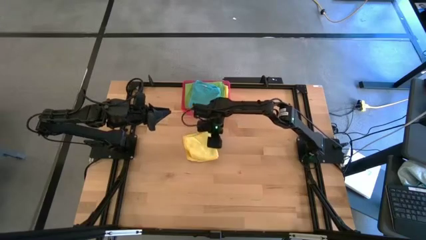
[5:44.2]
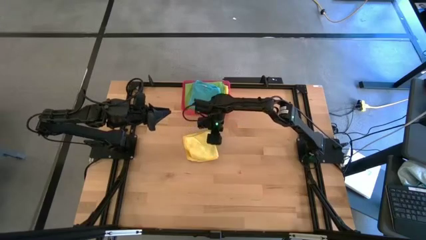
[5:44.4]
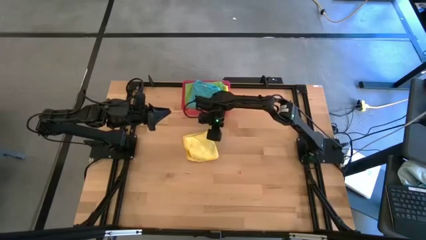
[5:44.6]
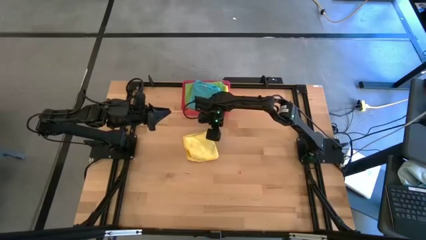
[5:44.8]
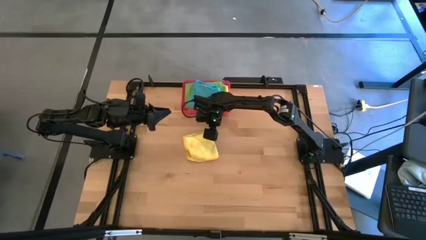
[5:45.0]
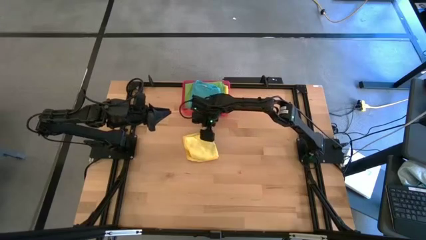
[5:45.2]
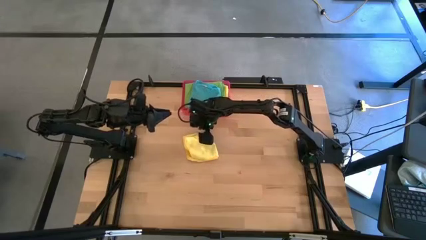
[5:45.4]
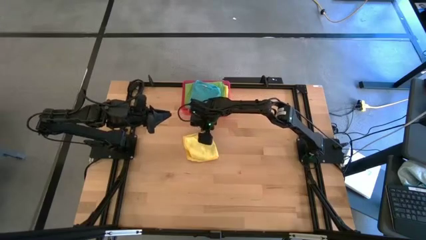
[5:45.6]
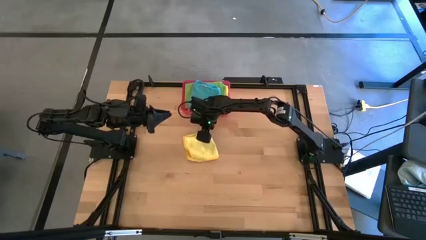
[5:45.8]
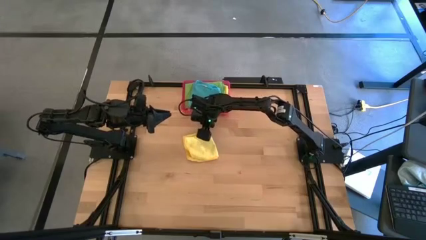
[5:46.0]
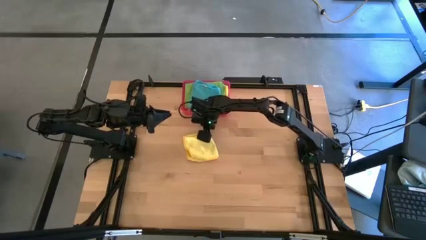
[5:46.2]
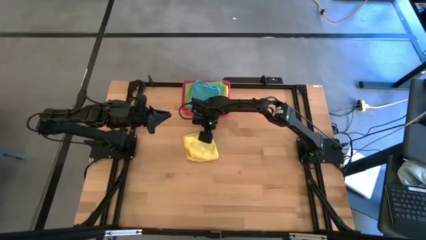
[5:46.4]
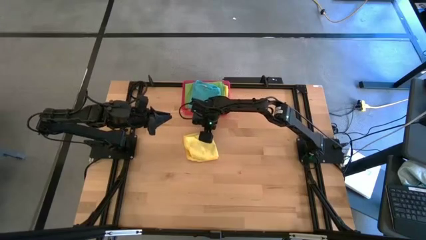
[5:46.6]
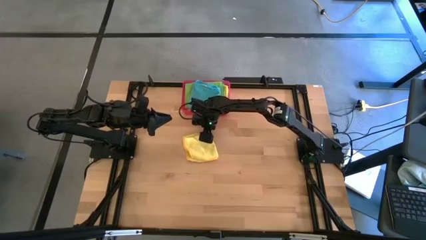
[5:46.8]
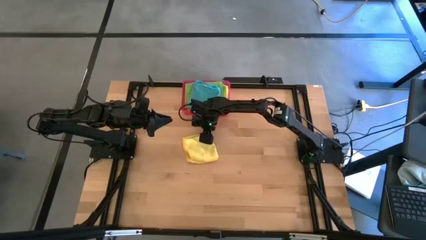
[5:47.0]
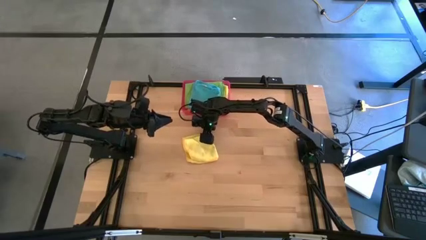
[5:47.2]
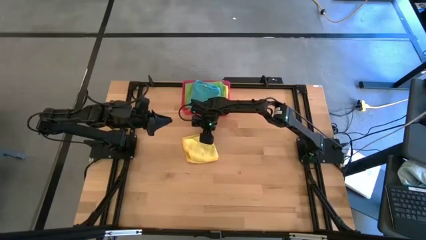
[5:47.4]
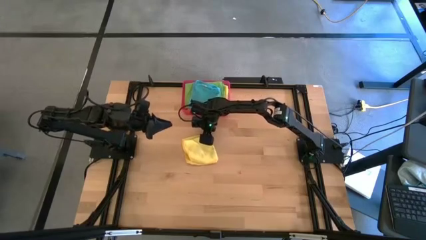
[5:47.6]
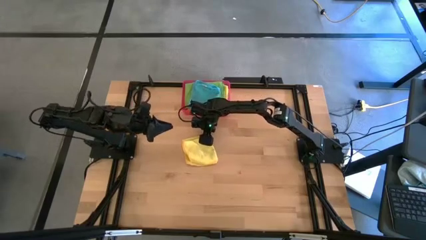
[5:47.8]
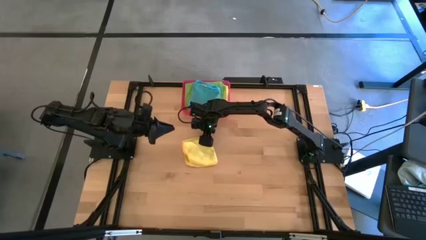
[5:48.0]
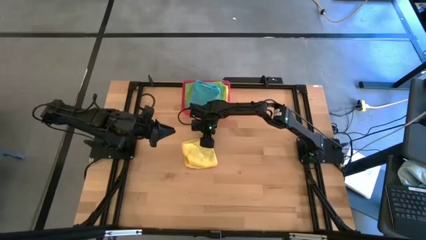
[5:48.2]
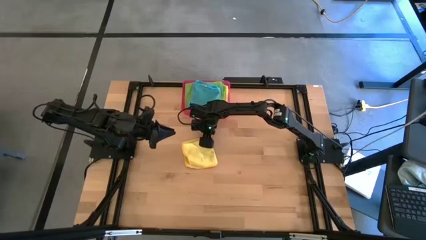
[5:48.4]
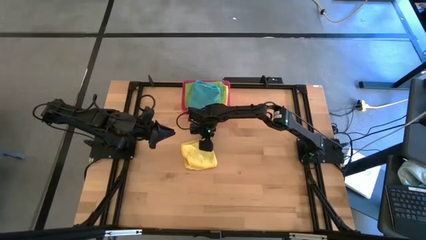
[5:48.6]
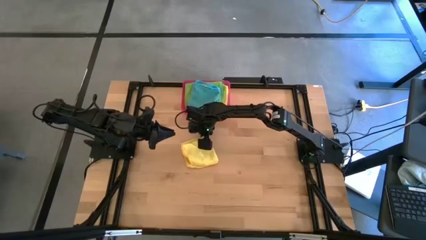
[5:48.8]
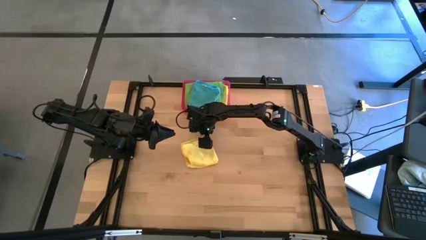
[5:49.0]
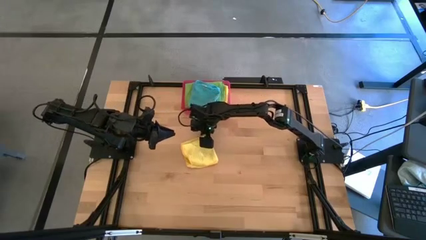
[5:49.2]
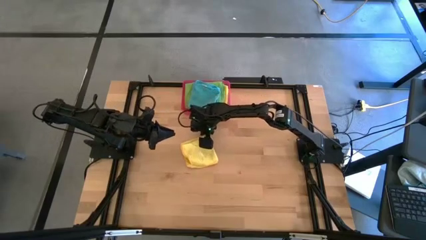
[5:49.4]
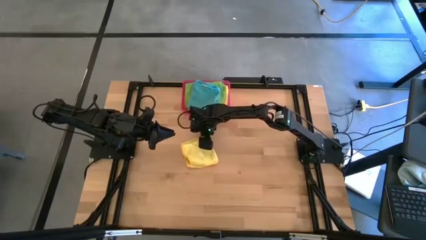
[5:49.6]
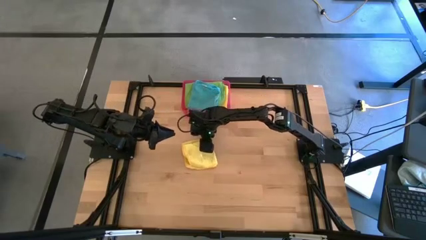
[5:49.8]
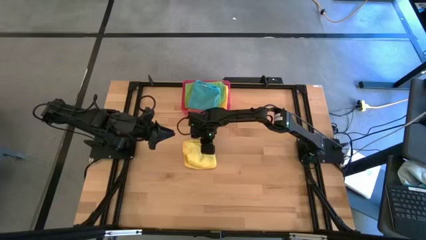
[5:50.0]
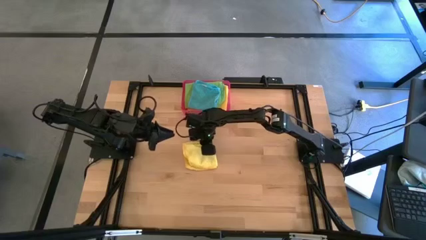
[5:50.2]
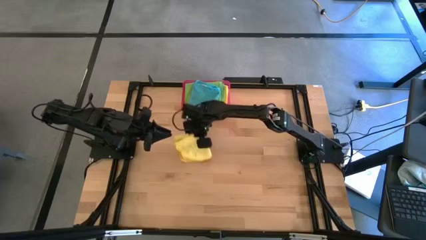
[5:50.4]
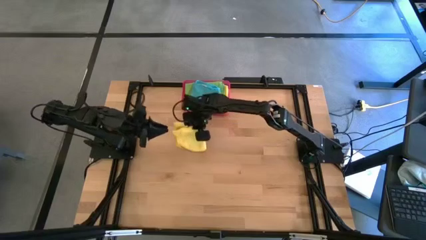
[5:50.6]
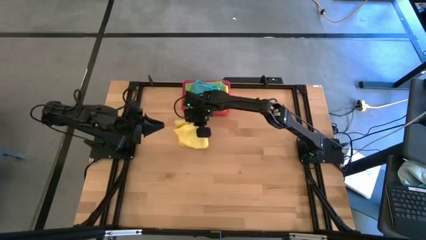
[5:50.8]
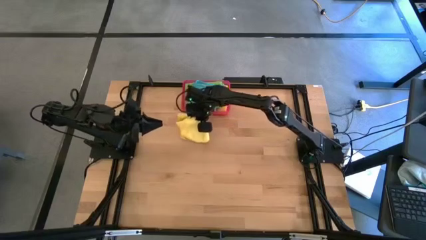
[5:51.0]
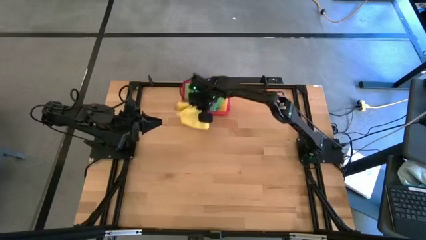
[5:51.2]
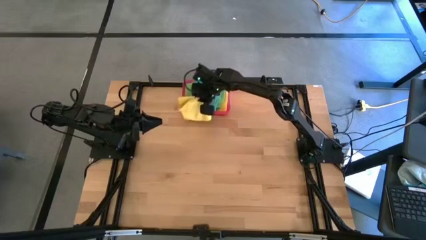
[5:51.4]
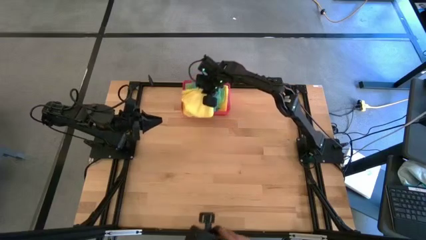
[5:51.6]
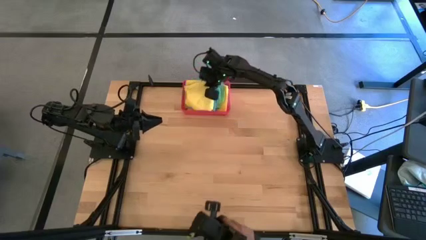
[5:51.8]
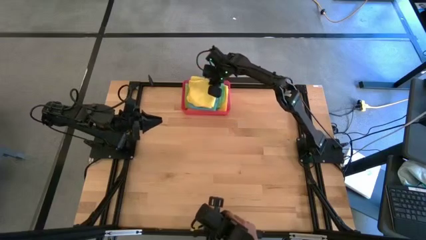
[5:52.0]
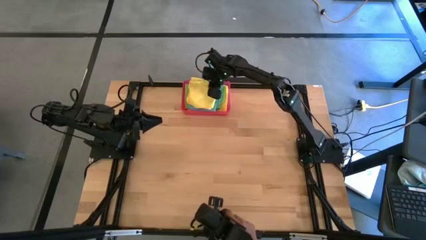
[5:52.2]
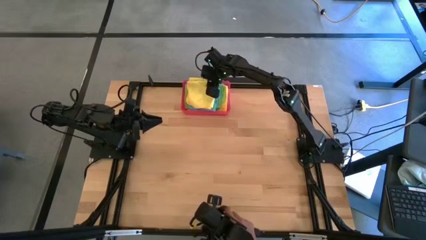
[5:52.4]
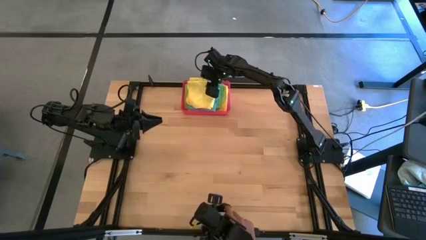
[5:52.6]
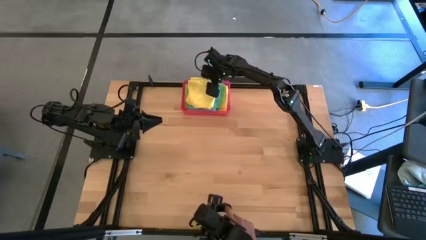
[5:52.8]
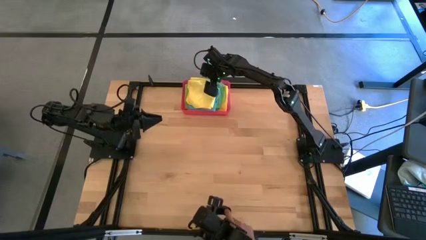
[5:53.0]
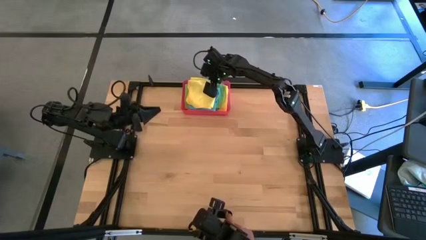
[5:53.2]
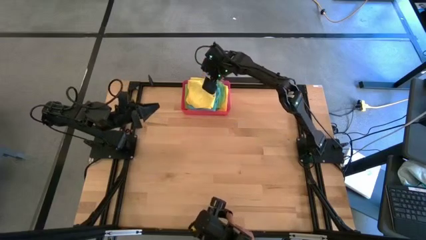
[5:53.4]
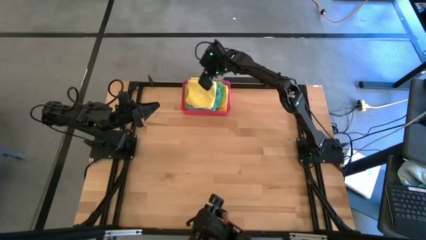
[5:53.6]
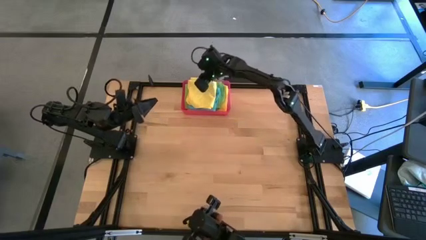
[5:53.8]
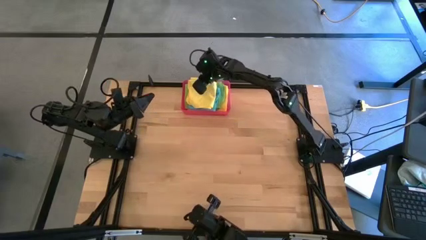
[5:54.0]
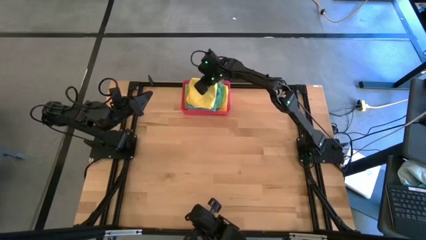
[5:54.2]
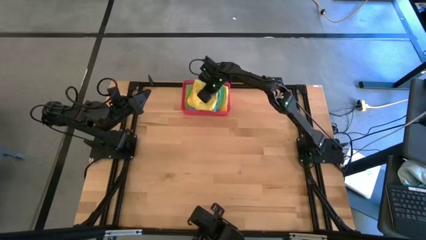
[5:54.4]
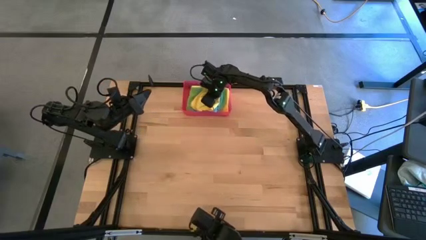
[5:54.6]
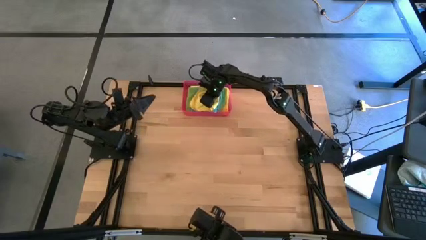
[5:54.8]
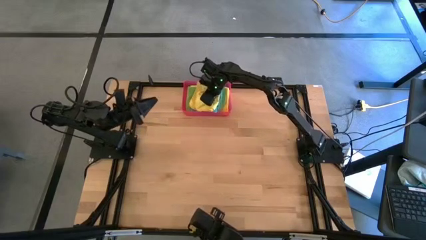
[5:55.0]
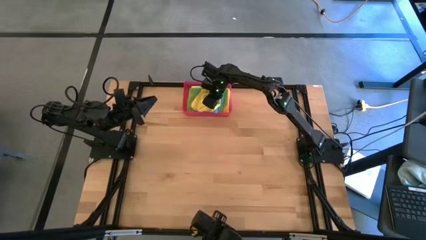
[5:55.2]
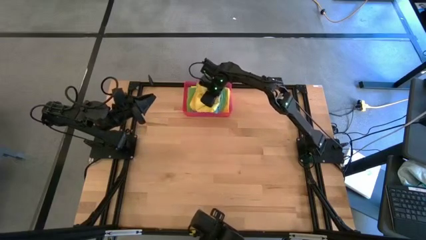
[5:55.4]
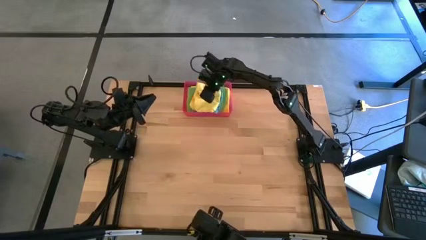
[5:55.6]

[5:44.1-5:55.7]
Task: Fold microfiber towels
Stack the folded yellow microfiber cloth on top of the blue microfiber cloth in the bin

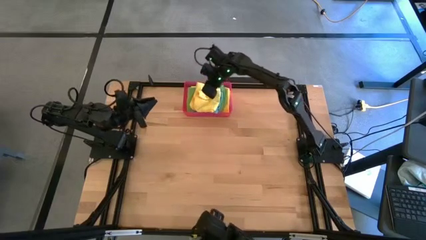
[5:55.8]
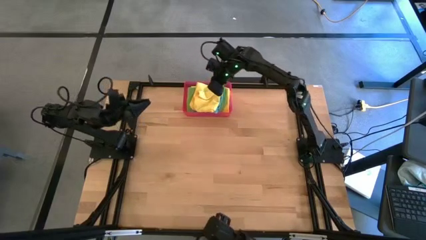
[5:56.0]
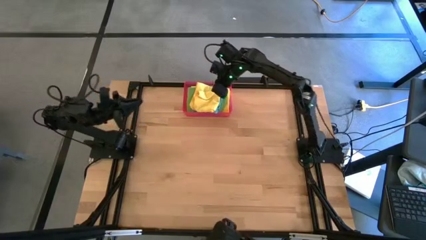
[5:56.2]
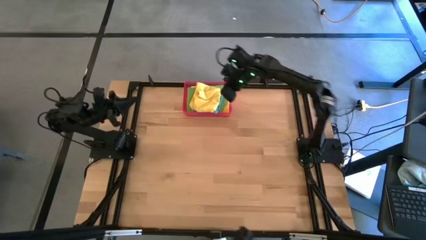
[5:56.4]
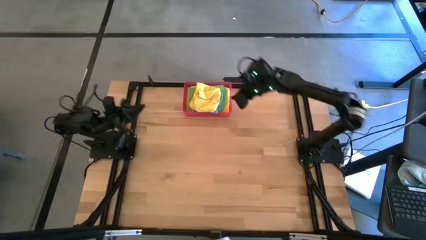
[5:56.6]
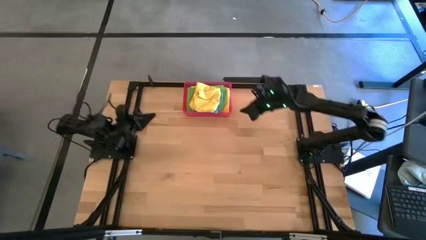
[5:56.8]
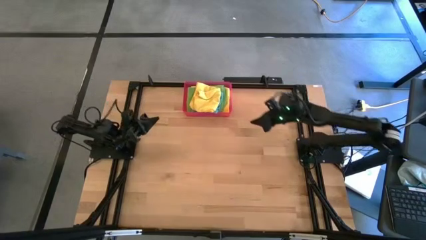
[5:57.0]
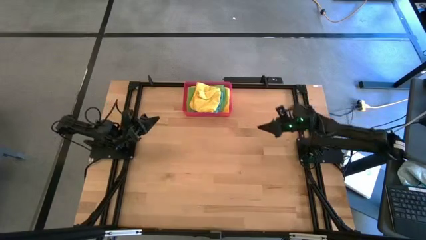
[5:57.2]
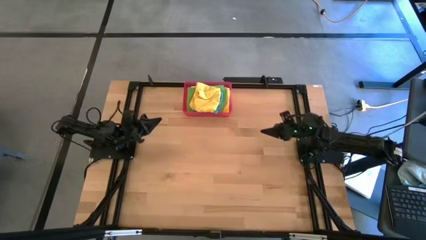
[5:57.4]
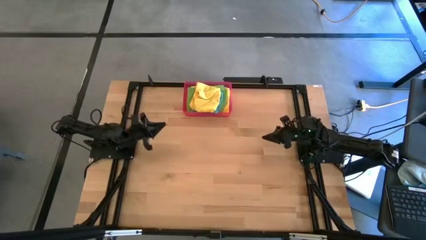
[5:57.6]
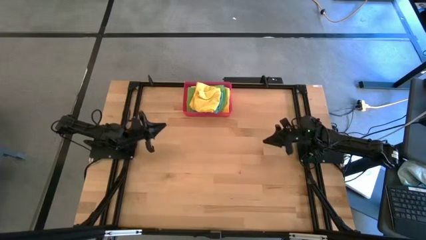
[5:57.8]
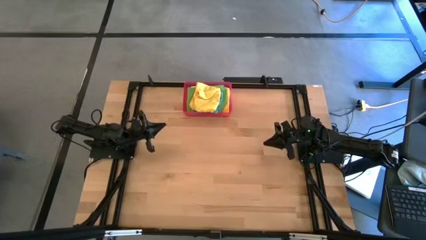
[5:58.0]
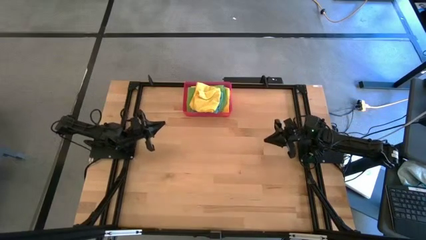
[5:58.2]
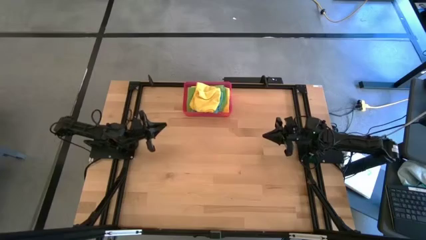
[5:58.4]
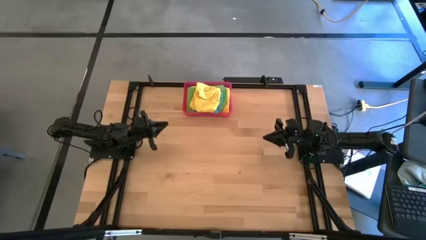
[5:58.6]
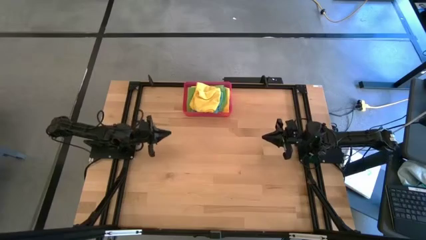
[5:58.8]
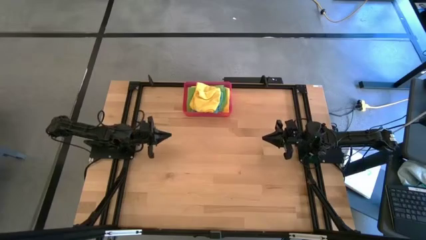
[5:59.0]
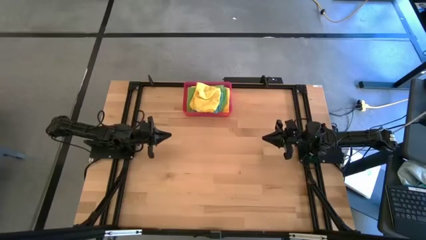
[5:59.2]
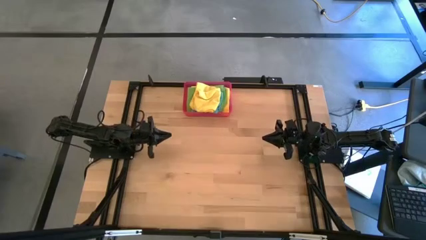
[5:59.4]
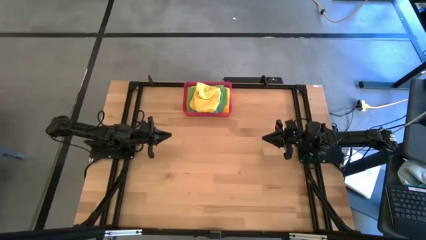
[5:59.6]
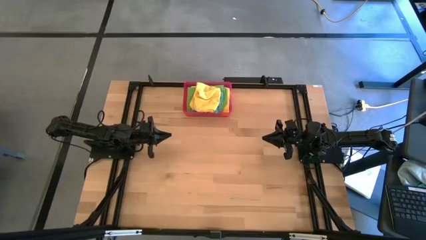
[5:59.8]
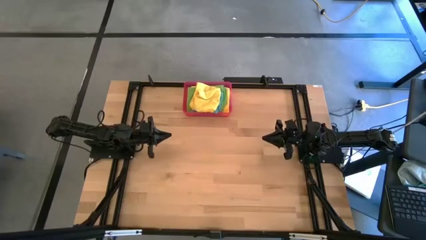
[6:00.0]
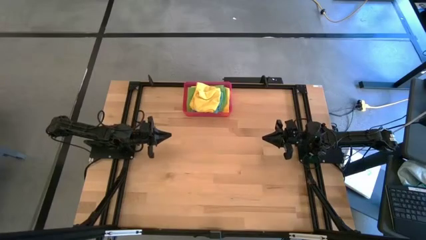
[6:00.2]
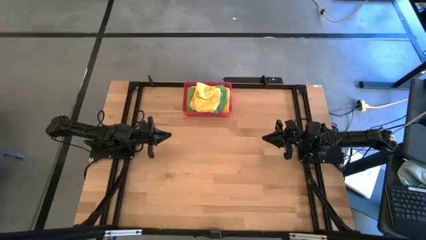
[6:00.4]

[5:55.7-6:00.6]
Return to Home Position
